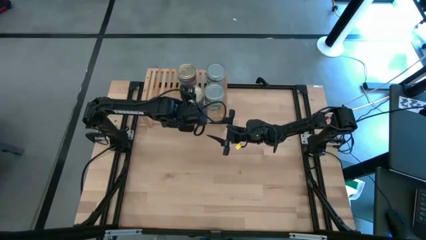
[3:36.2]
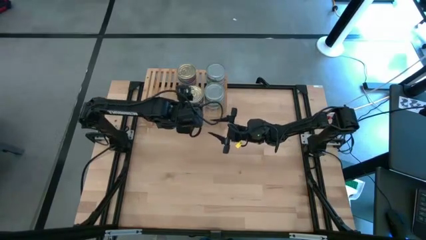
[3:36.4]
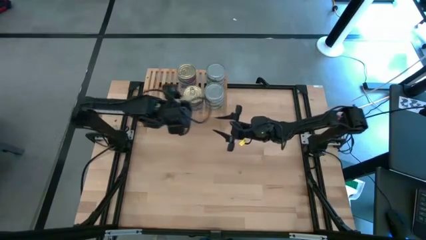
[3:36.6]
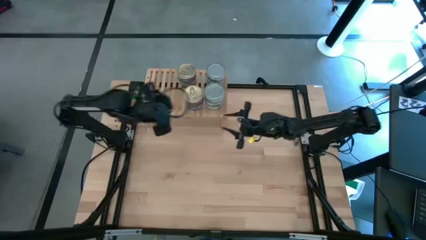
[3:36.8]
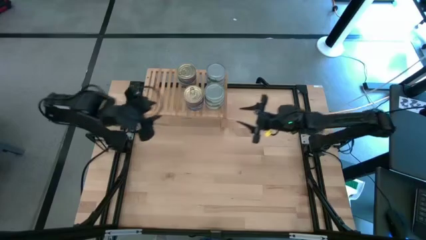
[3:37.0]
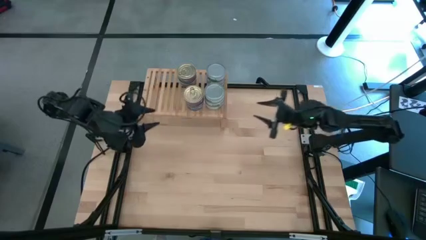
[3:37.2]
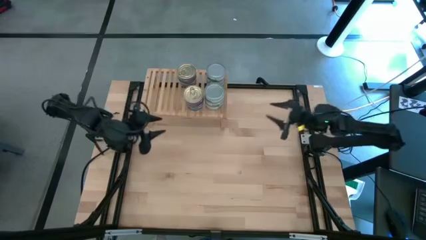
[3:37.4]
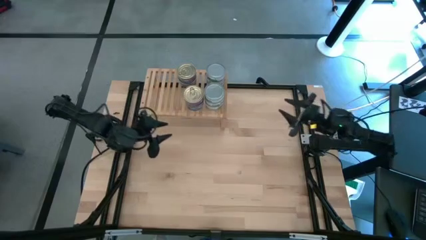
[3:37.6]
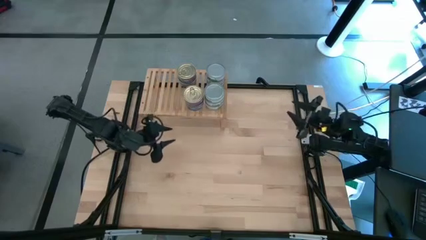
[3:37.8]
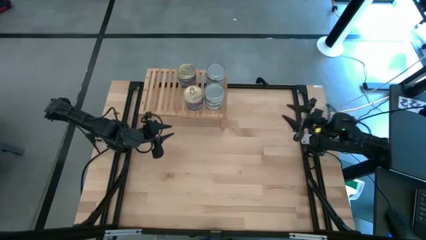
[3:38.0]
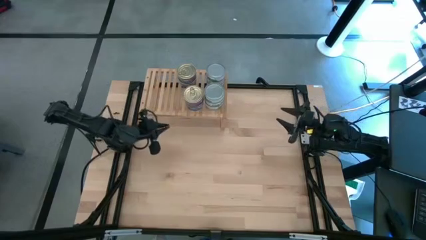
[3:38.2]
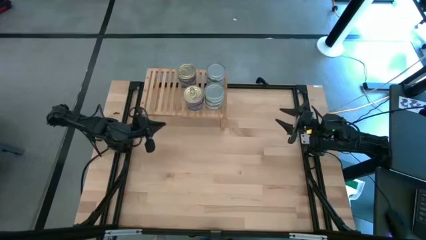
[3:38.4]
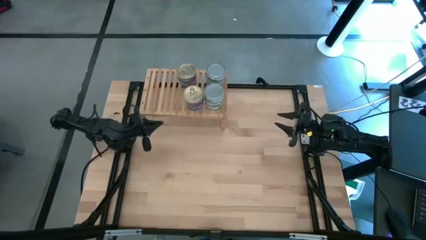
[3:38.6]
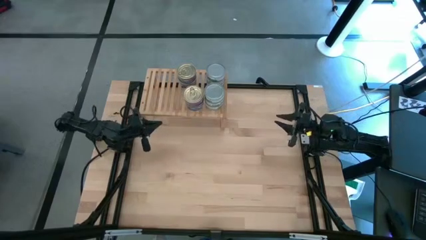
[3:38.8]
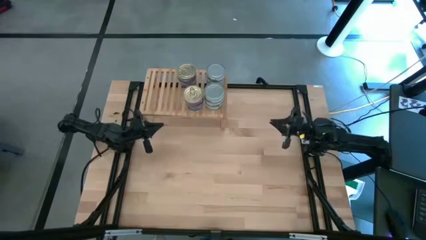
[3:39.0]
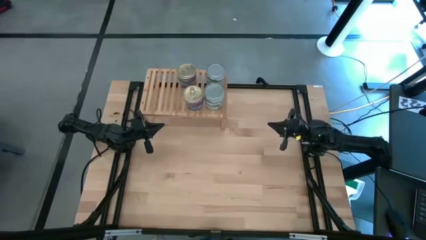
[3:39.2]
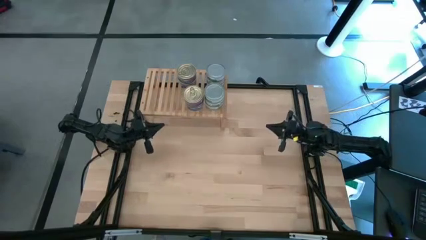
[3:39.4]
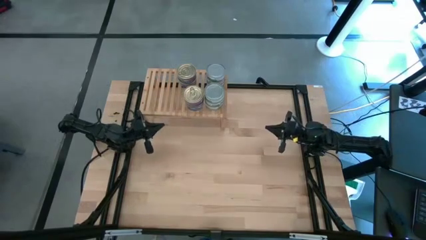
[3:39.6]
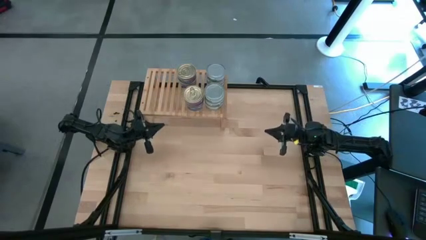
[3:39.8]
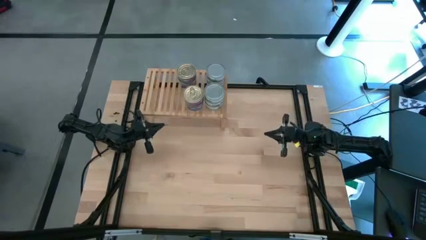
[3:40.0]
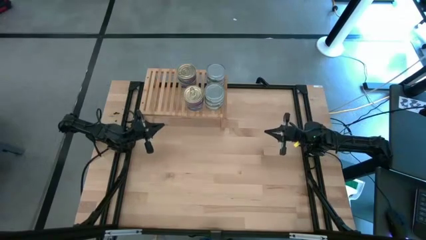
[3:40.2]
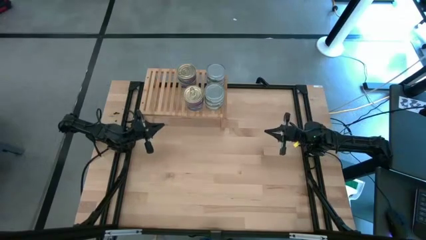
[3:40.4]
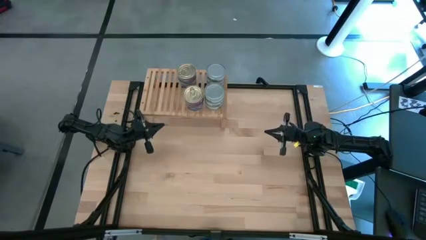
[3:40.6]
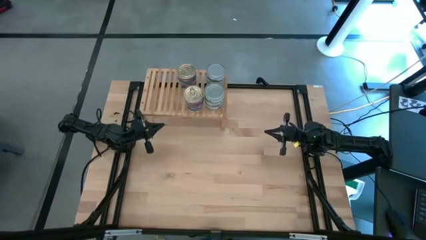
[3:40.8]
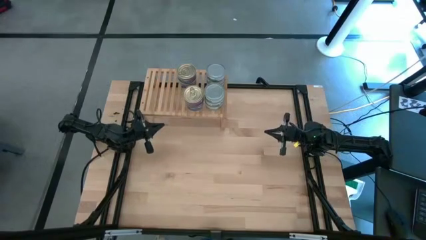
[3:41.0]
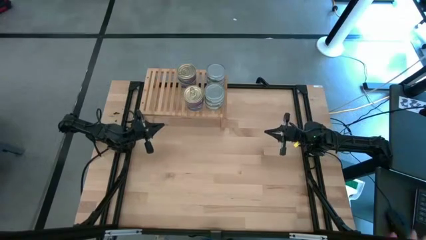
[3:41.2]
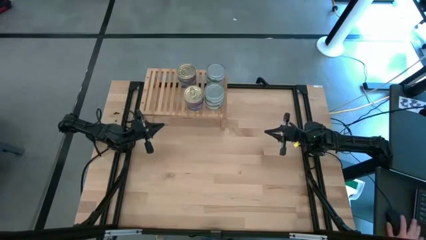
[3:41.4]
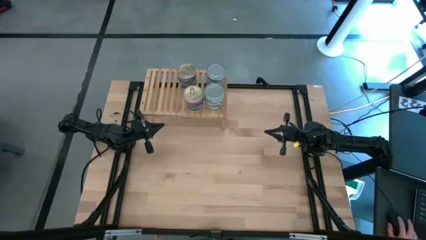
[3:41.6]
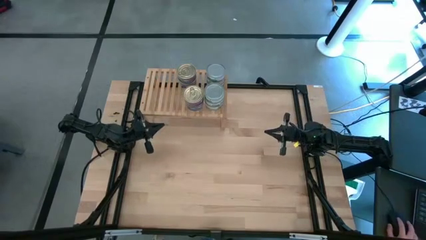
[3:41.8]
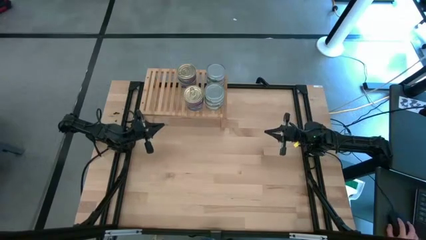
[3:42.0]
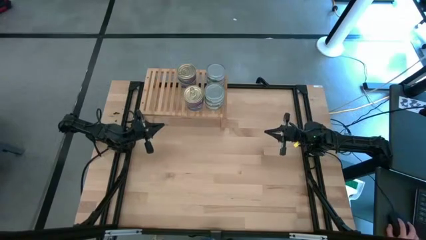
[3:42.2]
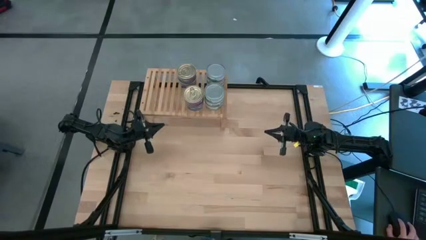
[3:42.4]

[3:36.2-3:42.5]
Task: Stack canned seafood by type on shelf
Return to Home Position

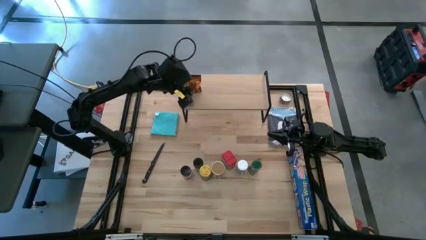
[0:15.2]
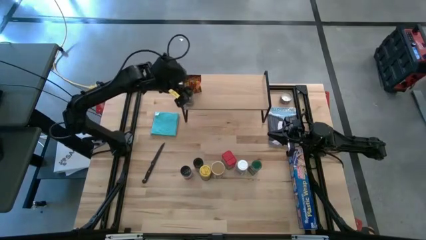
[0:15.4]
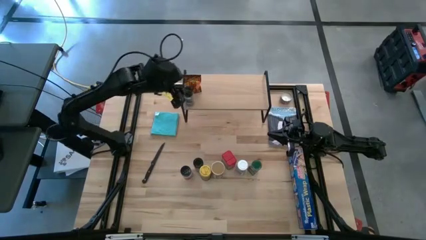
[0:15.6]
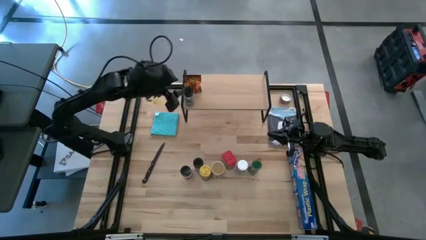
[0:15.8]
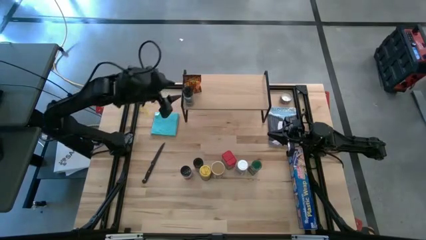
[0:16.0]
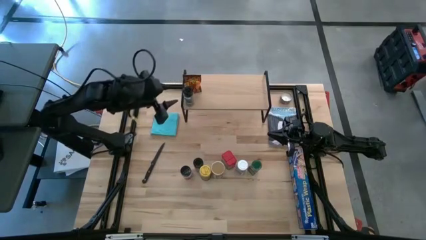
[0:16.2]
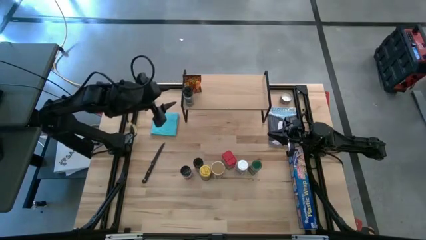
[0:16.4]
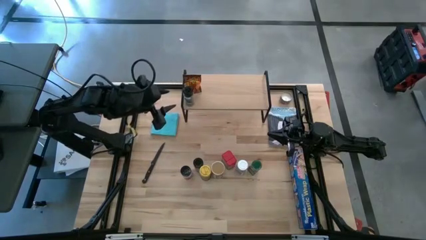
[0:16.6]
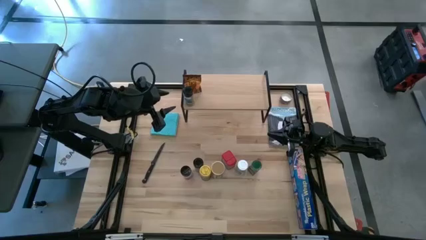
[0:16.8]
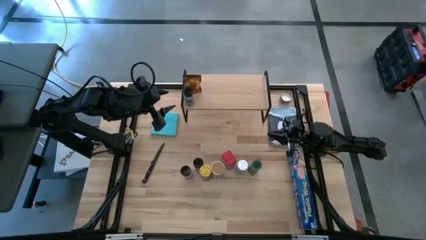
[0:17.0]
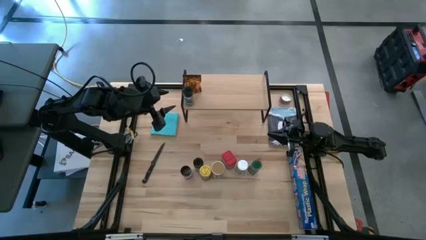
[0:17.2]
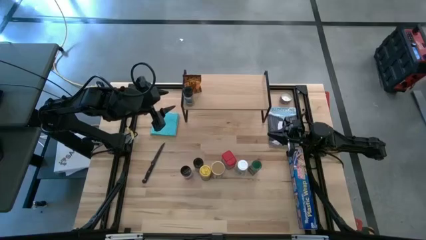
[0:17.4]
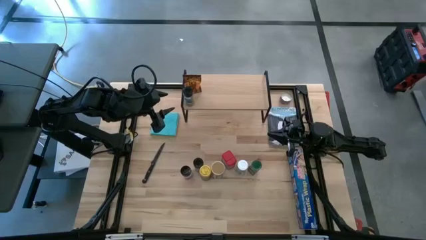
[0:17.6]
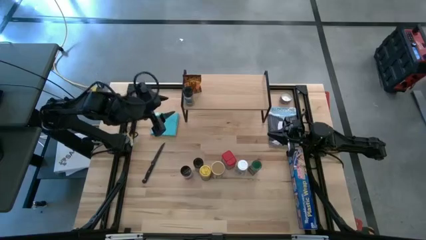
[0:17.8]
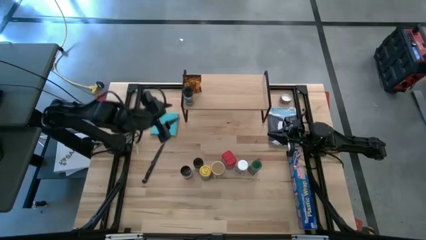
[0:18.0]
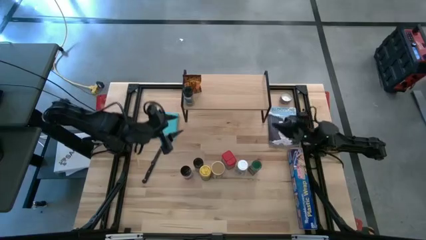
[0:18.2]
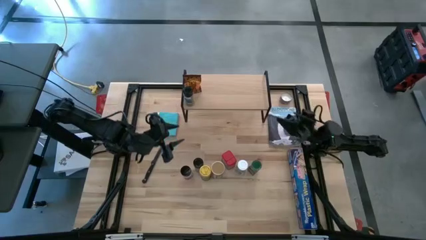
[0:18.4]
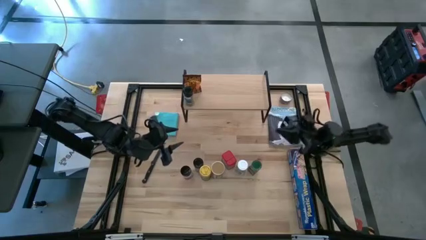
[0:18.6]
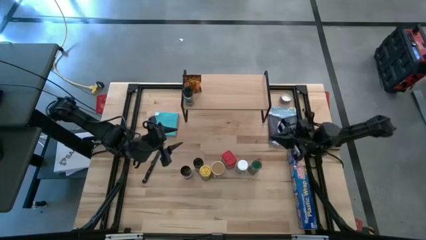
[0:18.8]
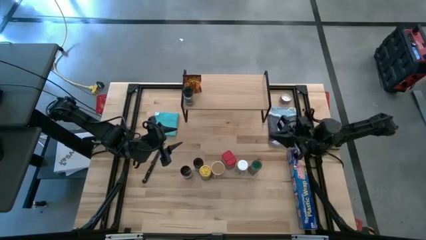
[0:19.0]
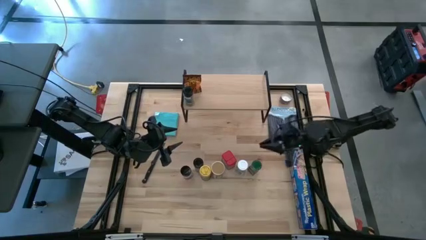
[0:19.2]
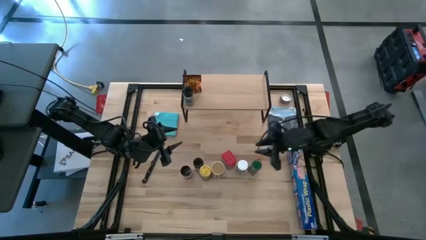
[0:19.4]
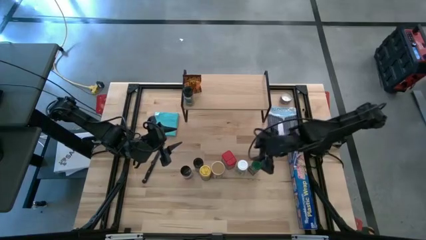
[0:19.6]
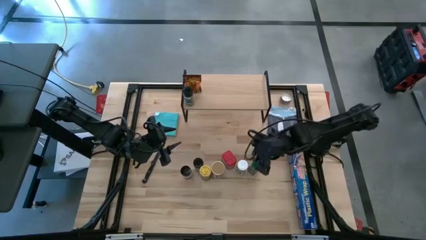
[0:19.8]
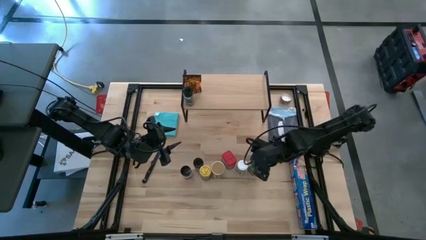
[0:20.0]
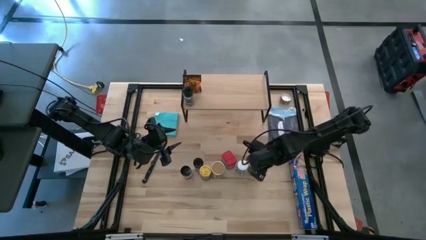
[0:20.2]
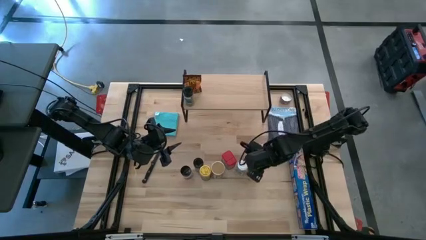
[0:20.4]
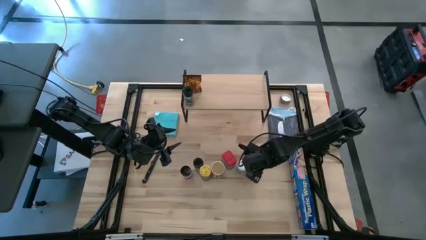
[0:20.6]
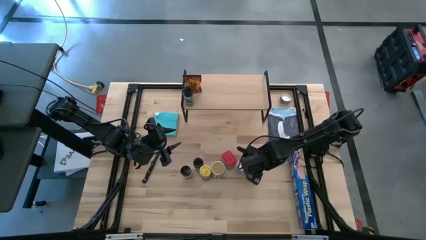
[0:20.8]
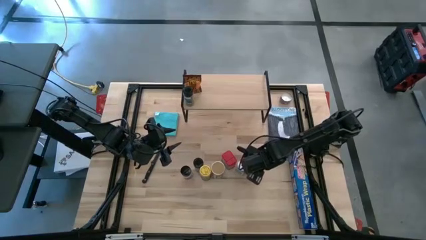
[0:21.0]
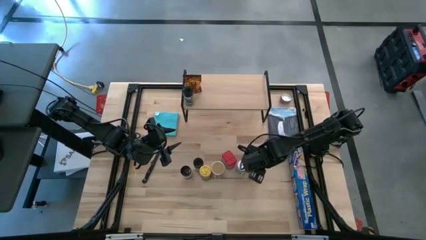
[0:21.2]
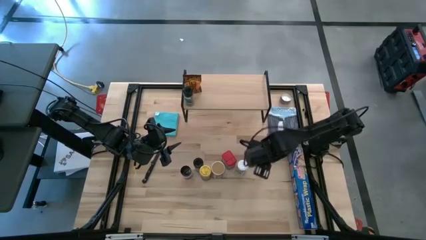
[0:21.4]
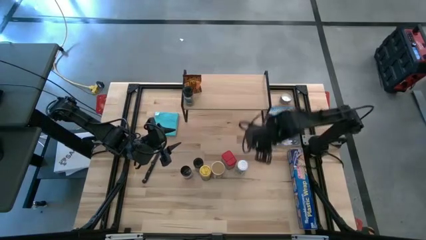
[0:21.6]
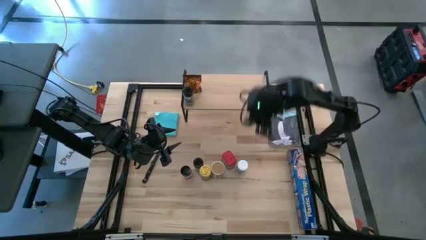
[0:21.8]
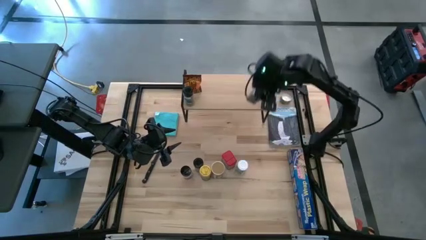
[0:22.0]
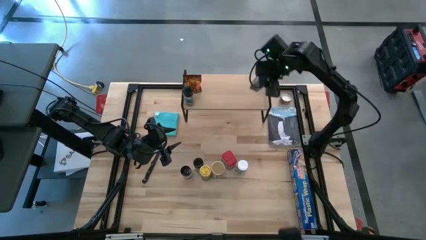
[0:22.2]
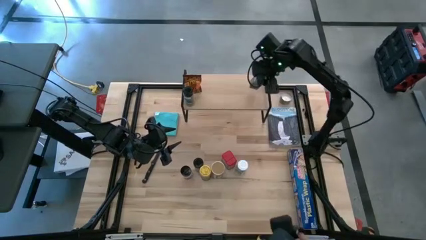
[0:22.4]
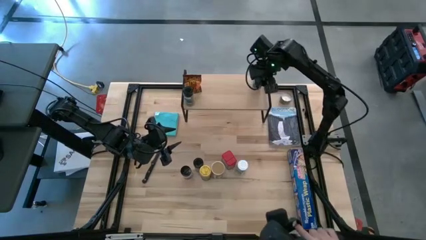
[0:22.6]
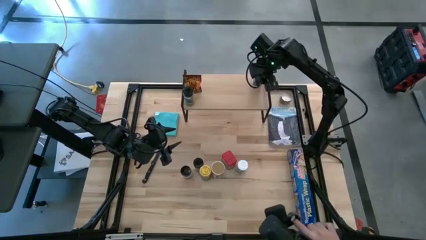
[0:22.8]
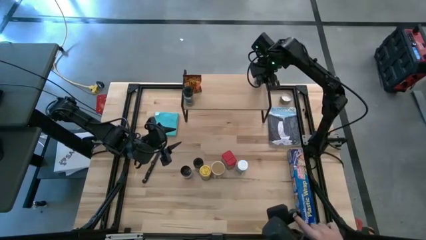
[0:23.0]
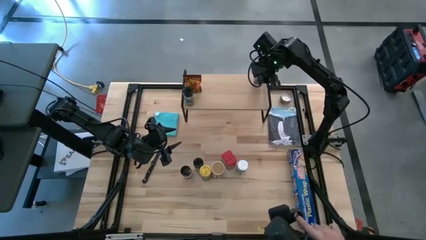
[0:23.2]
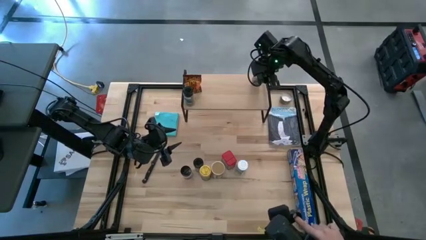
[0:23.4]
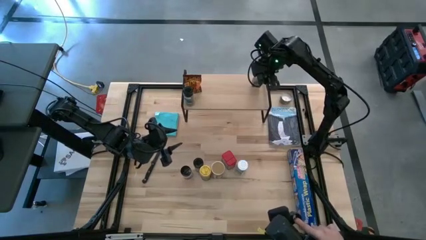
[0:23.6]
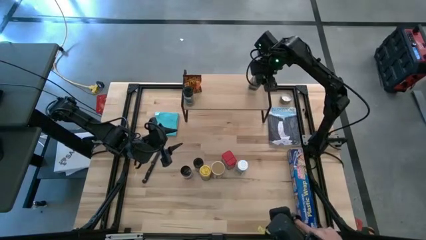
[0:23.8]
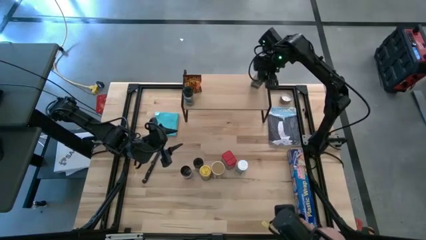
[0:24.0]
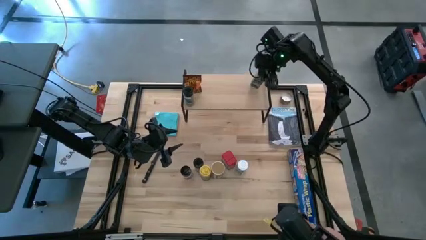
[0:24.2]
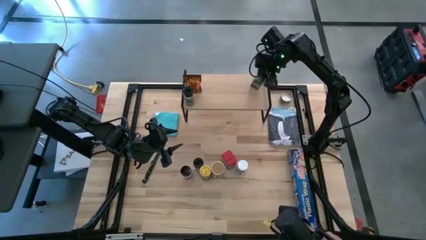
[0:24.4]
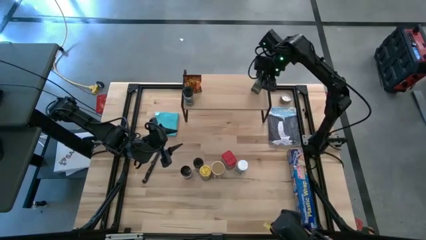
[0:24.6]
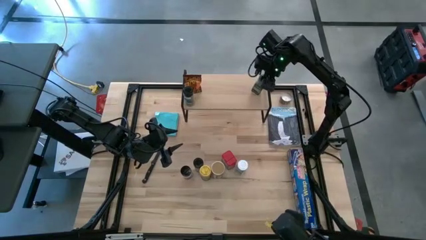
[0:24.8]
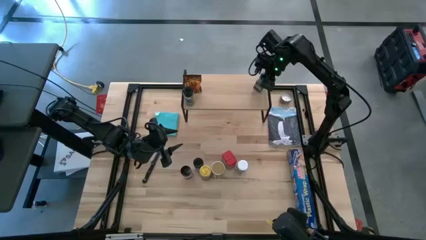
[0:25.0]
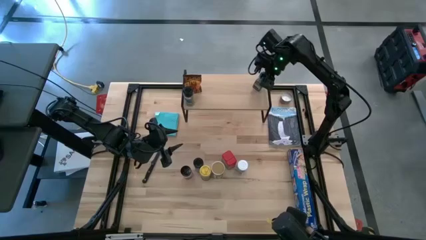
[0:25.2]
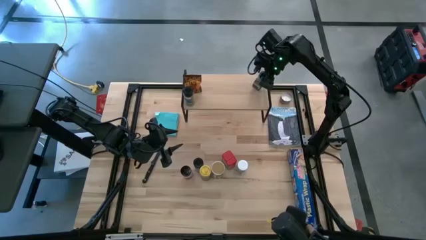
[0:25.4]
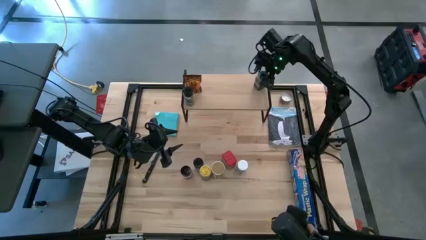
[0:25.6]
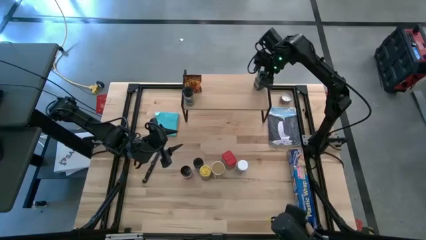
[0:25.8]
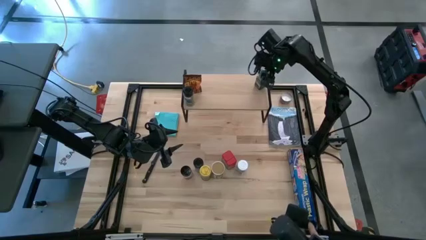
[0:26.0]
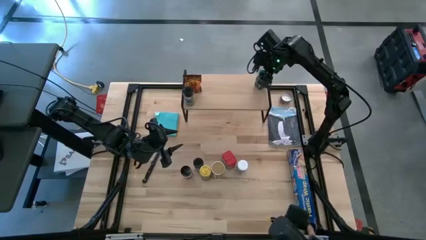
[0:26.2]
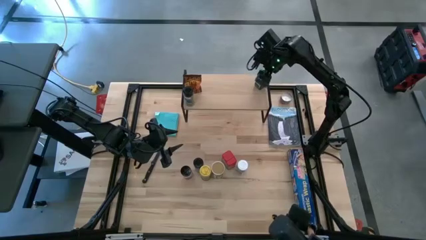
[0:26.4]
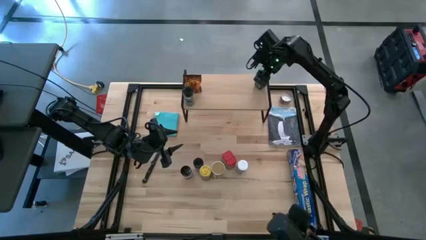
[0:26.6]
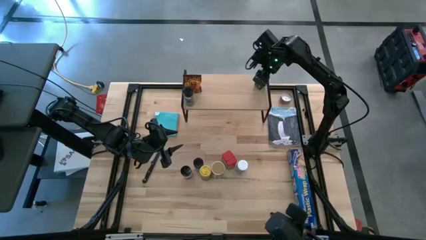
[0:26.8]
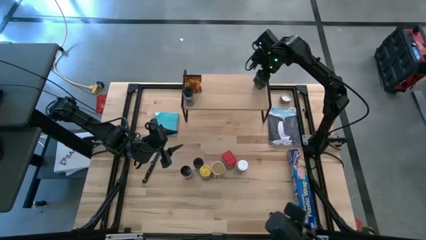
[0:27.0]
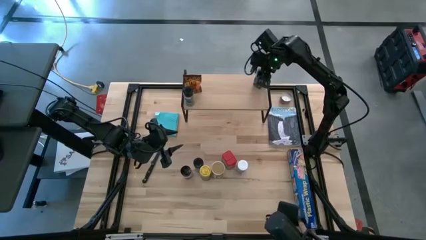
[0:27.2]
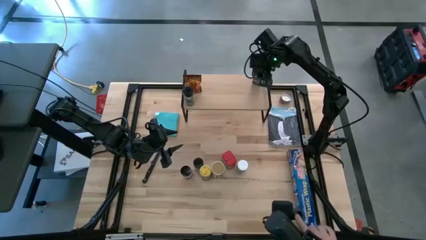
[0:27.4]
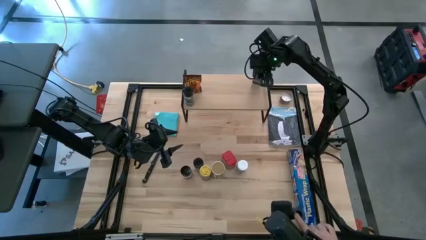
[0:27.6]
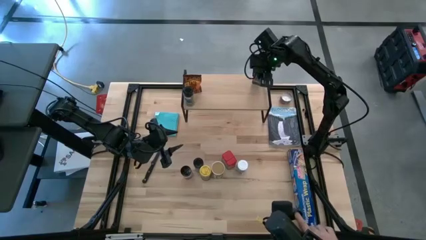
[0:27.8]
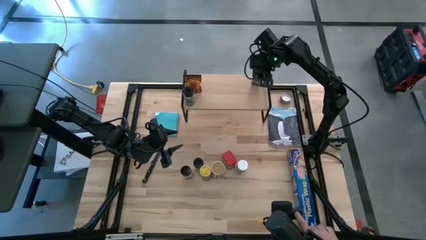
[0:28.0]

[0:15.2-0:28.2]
Task: Shelf spices
Put the green seasoning bottle on the shelf
